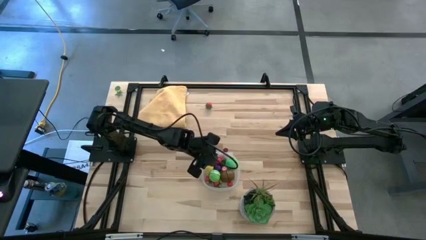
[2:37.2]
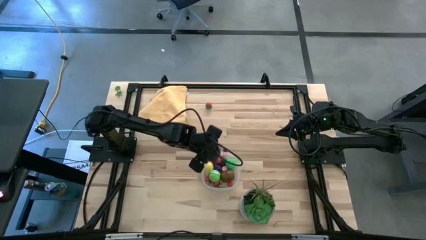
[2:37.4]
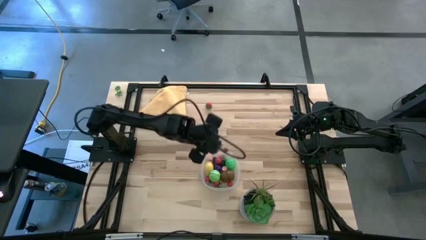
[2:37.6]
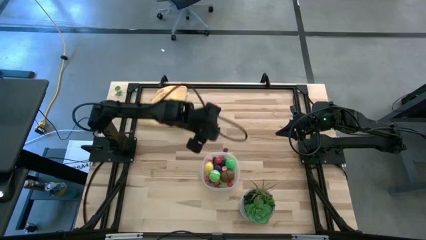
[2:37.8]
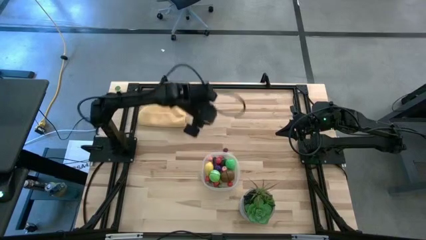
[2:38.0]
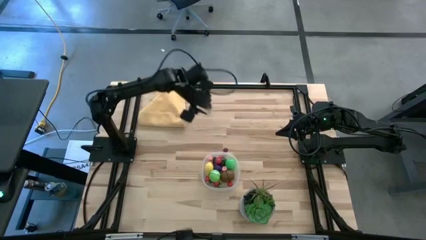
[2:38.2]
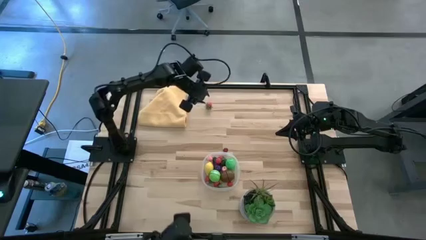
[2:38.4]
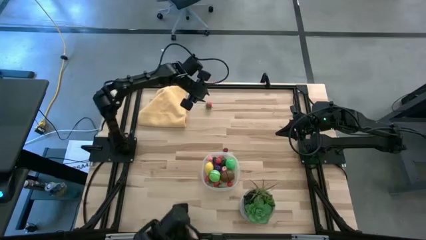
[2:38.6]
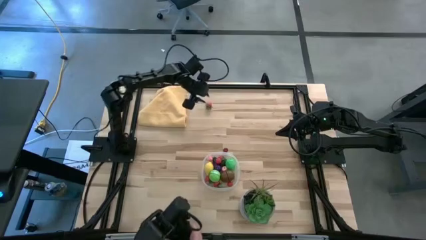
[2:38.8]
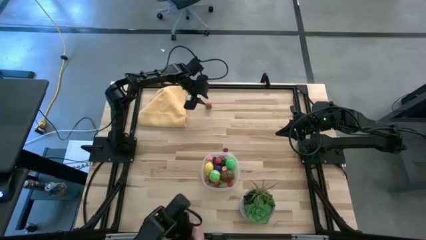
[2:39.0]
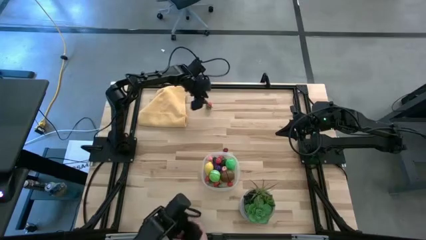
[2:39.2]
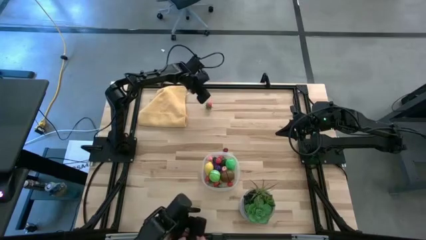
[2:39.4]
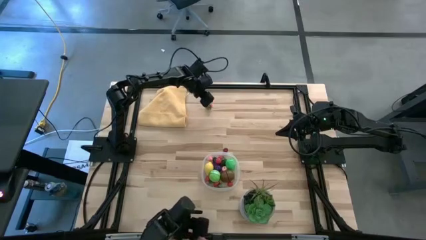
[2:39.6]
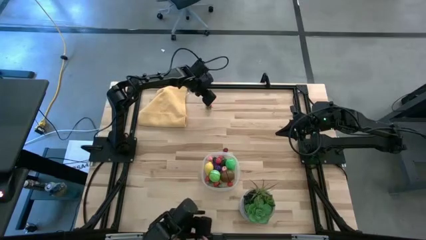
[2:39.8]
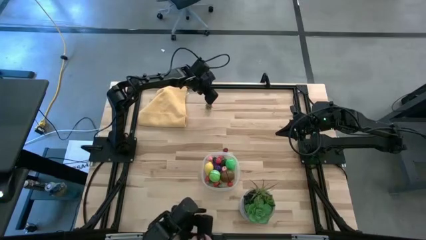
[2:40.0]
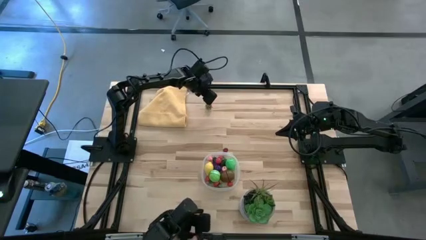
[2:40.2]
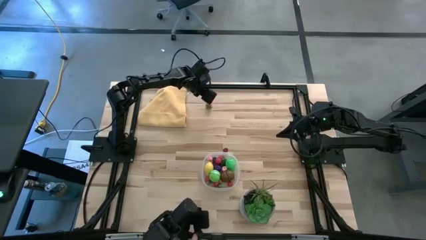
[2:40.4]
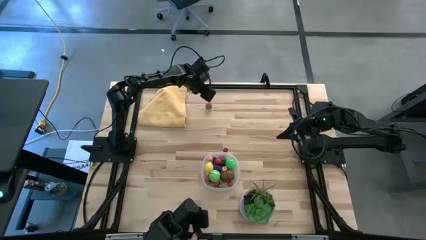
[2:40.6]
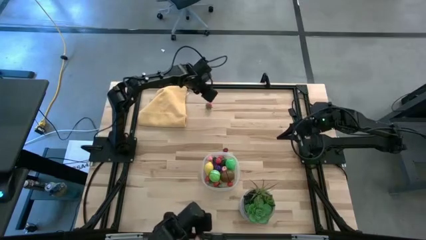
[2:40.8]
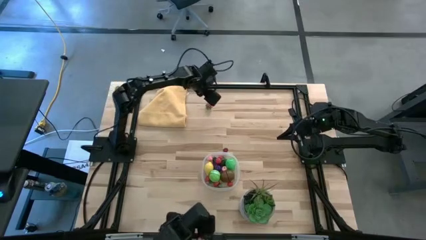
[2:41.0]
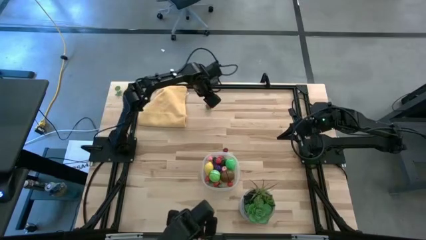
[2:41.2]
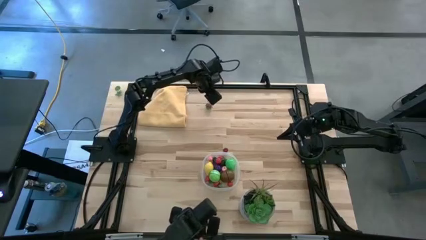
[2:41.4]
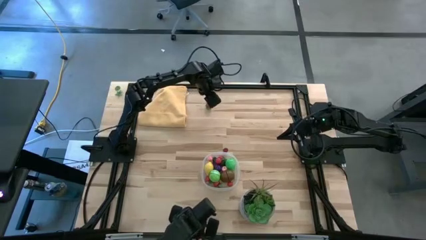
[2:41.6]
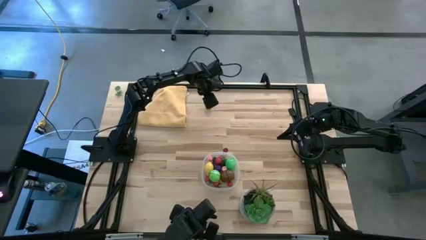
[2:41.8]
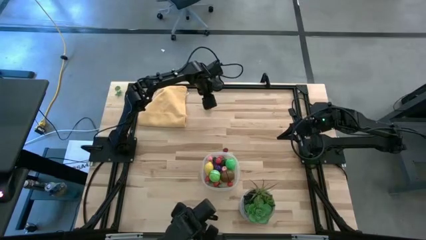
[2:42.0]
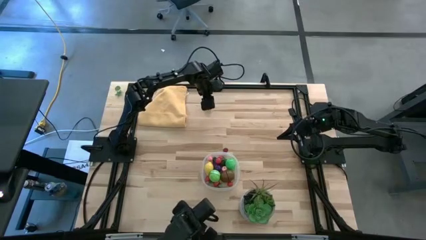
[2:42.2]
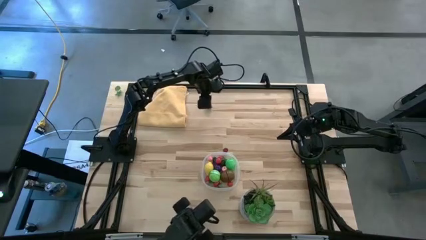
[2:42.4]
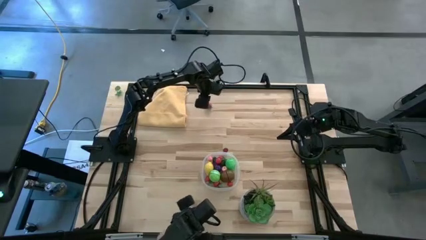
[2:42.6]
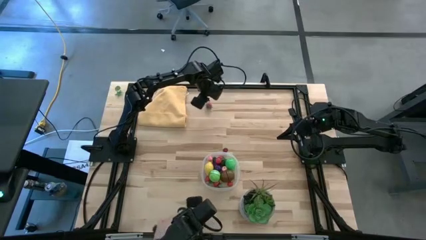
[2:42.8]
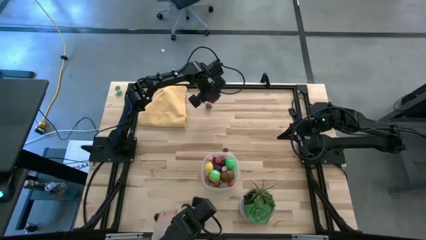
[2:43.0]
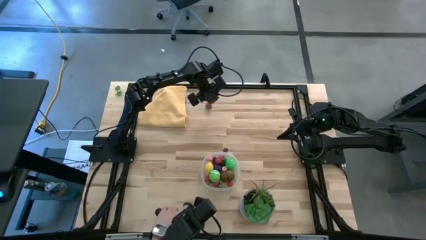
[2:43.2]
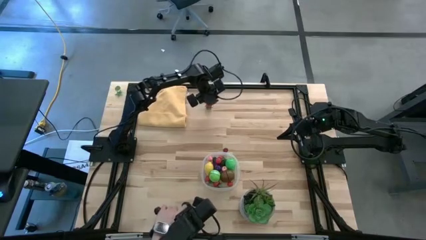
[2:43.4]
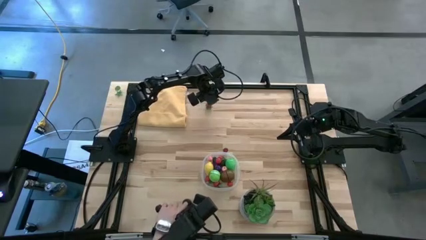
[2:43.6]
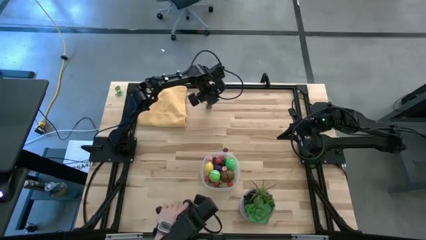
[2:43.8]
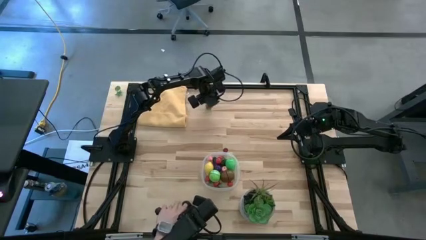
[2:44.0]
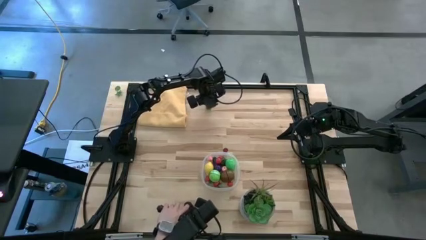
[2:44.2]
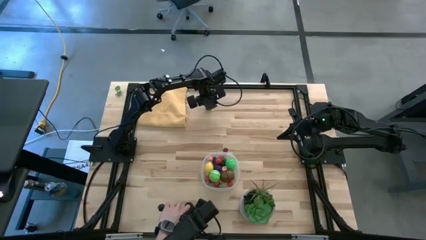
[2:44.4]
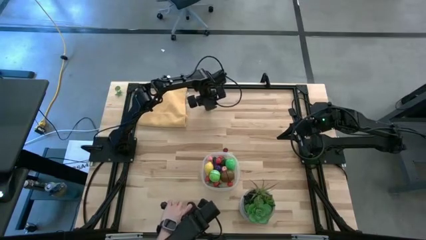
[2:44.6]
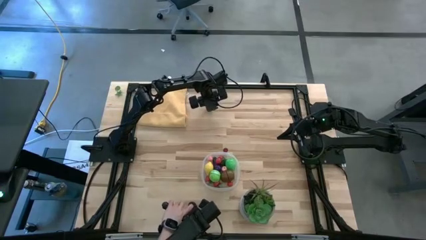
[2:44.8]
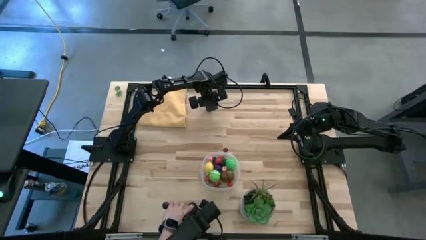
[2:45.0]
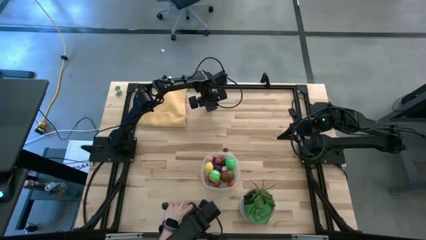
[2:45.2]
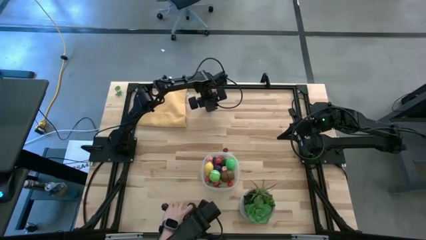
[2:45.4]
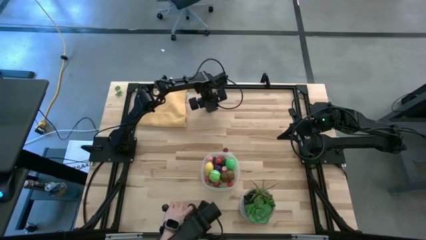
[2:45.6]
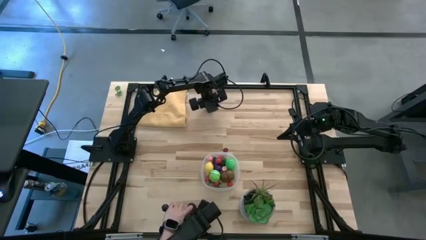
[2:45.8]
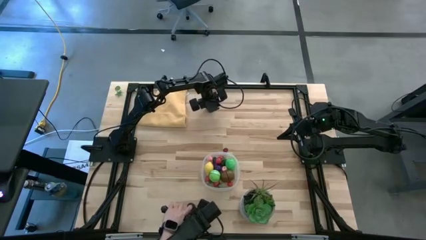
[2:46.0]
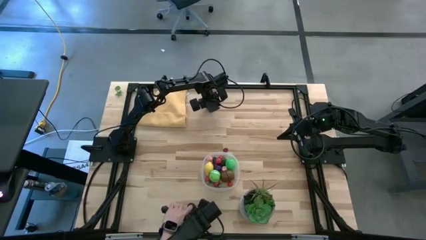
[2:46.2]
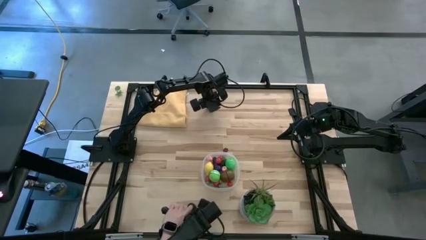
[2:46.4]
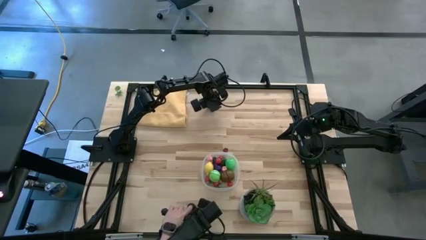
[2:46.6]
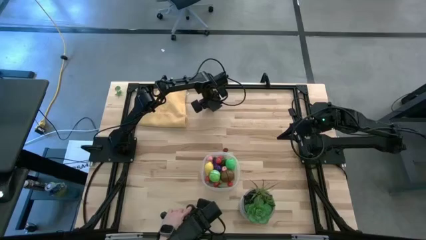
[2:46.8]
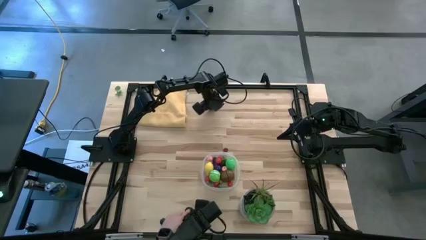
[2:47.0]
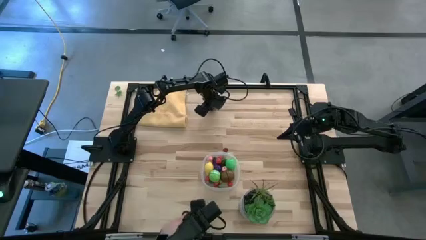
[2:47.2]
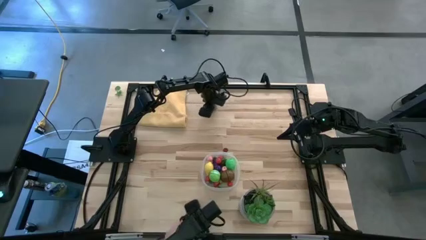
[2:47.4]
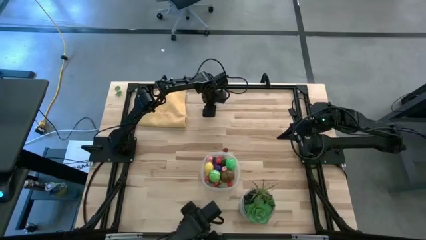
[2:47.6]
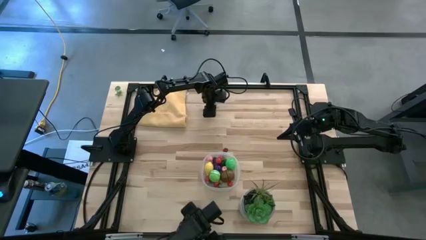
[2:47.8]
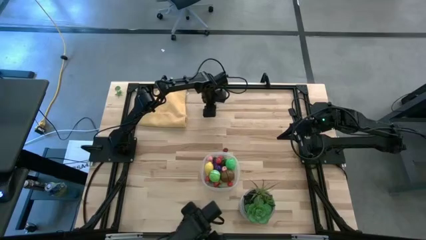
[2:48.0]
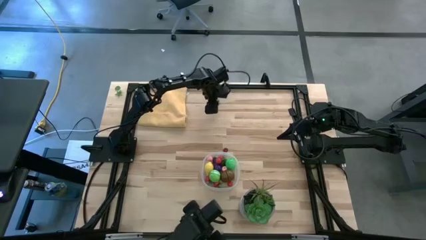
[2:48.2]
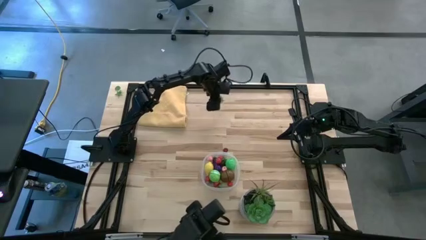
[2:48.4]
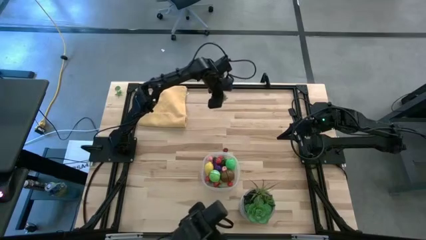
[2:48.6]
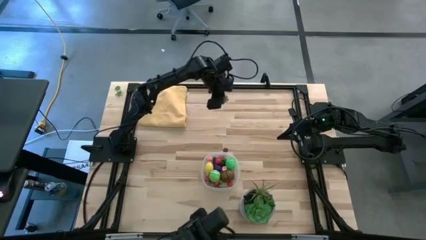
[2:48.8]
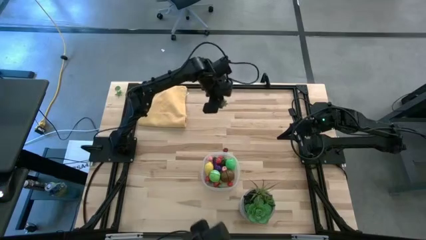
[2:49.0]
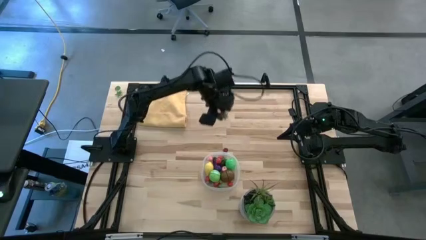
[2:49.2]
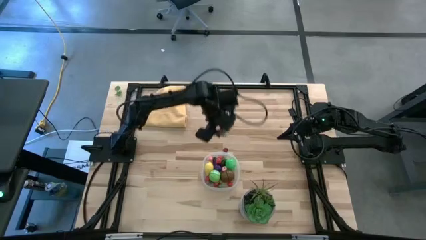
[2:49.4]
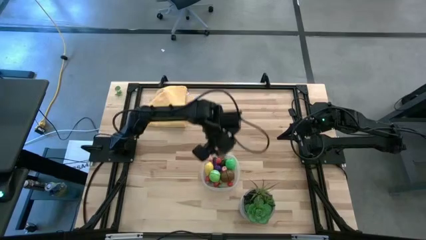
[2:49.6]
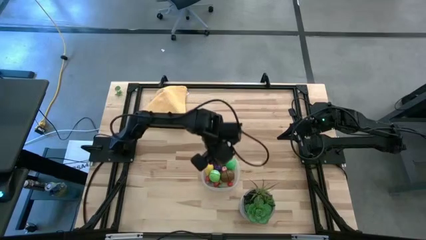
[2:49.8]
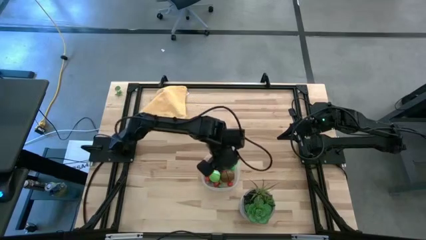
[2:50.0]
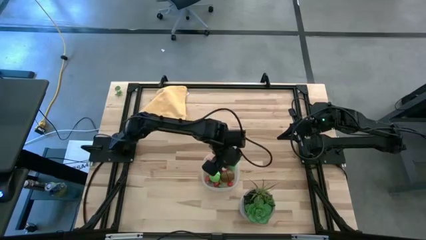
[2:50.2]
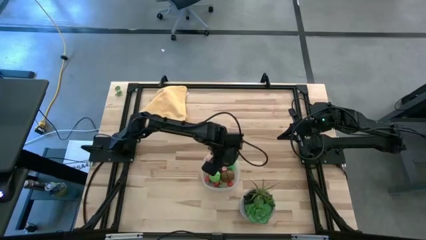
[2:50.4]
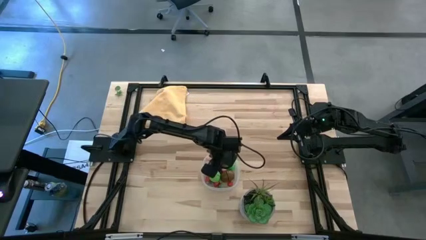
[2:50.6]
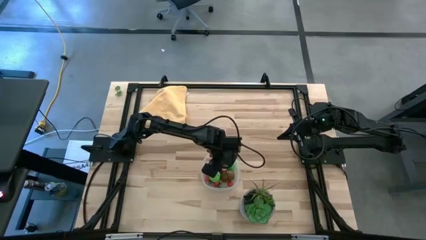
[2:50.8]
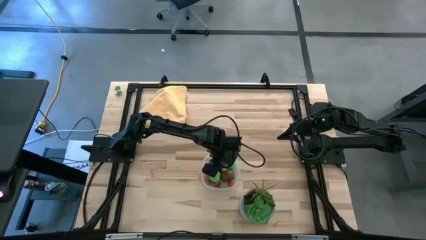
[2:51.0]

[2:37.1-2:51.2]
Task: Pick and placing Produce into tupperware
Put the red strawberry into the transparent bin
